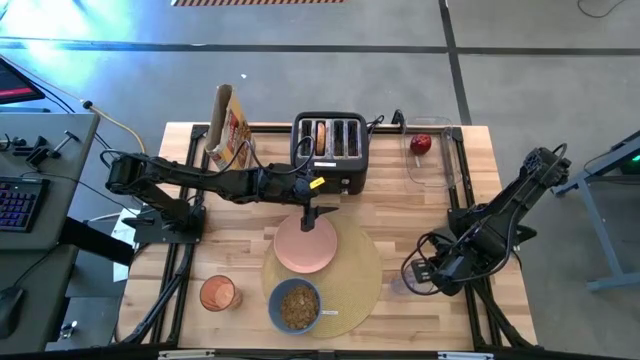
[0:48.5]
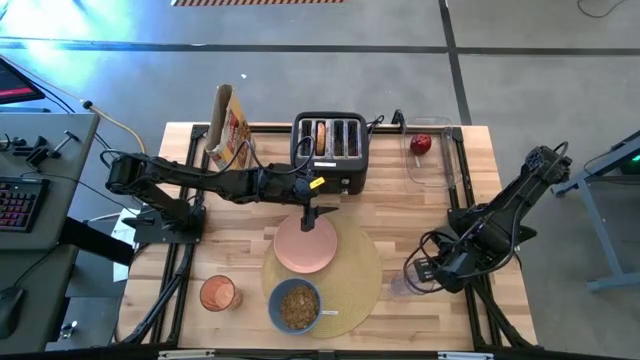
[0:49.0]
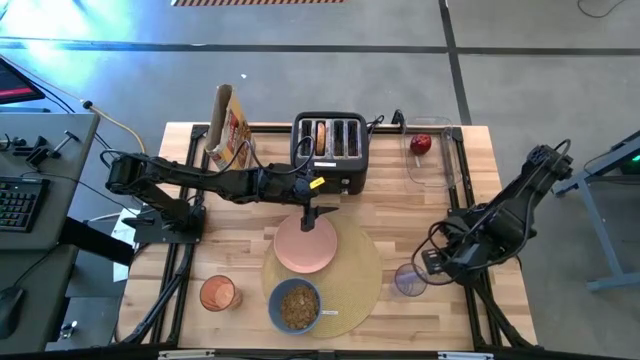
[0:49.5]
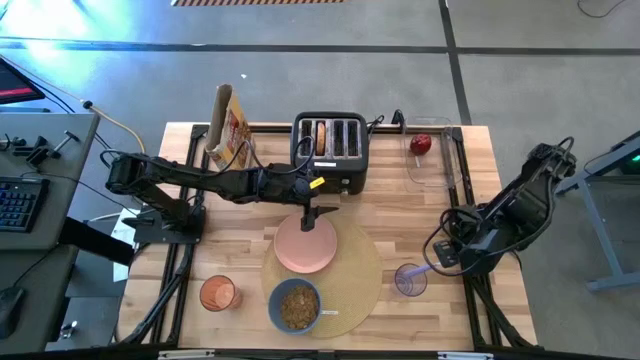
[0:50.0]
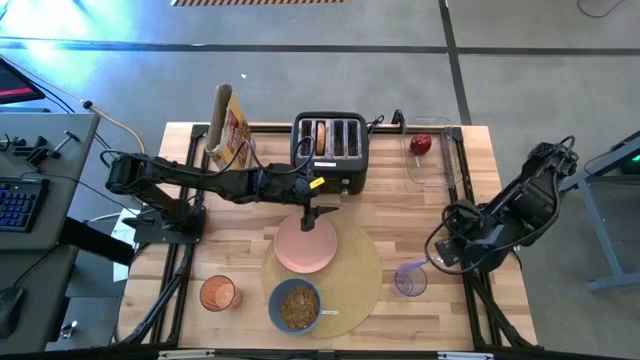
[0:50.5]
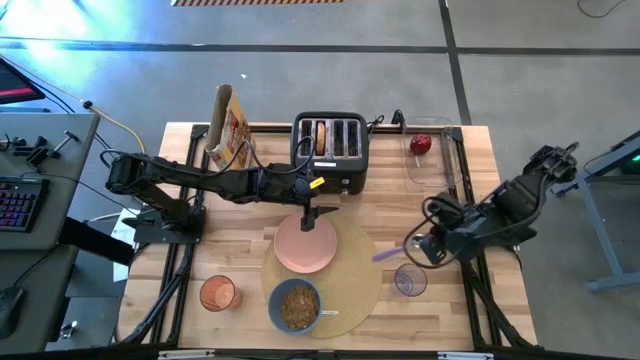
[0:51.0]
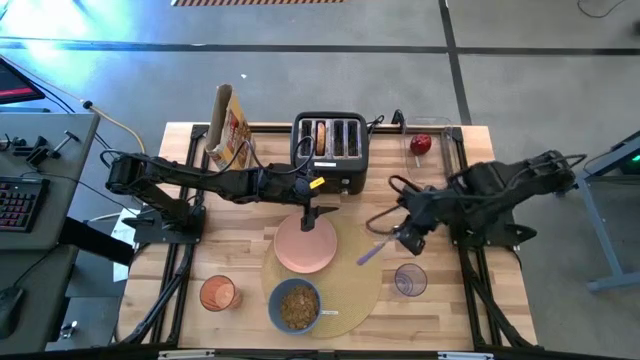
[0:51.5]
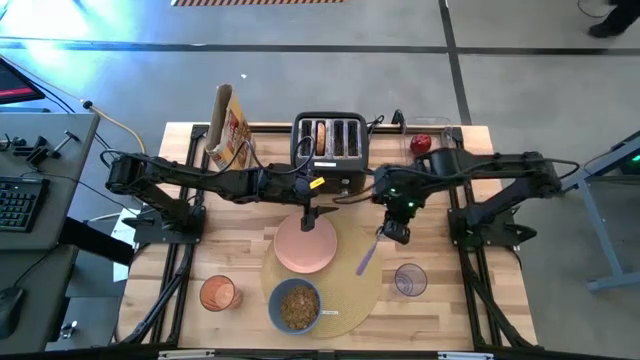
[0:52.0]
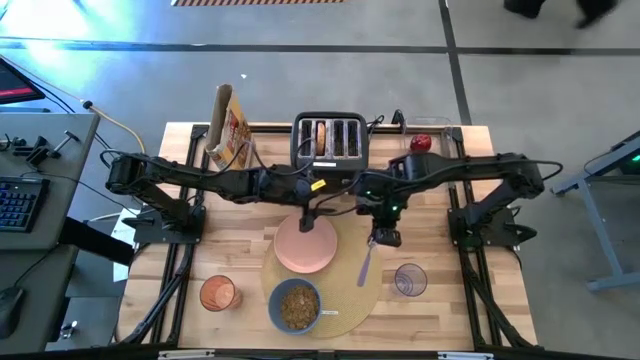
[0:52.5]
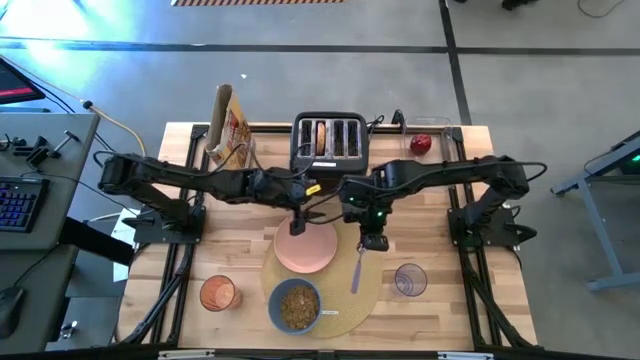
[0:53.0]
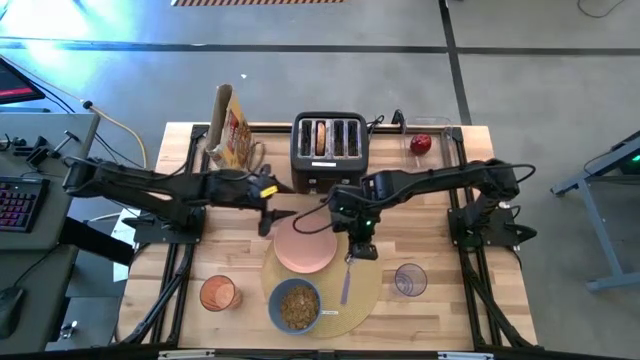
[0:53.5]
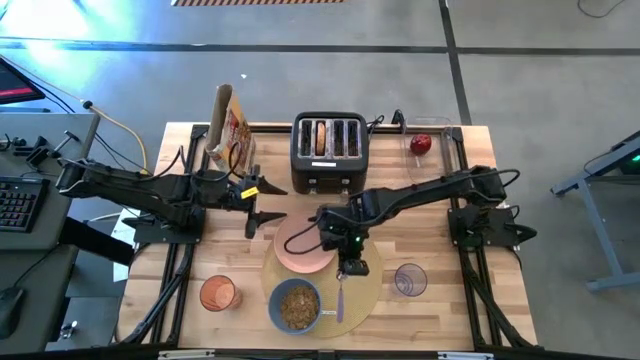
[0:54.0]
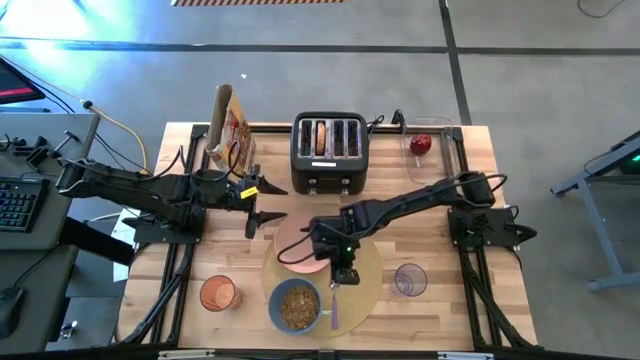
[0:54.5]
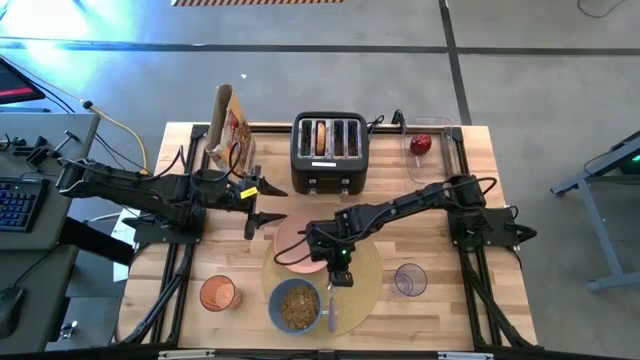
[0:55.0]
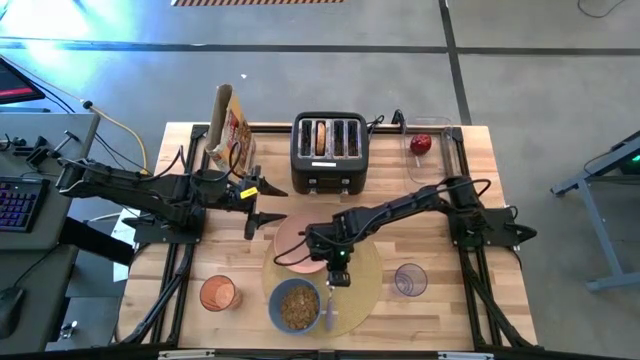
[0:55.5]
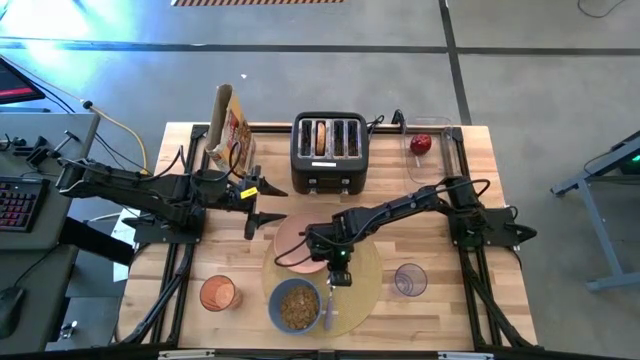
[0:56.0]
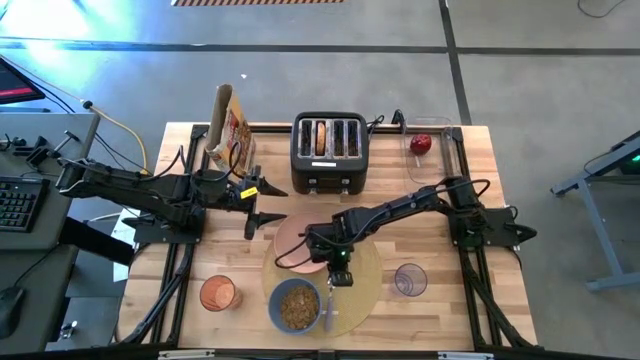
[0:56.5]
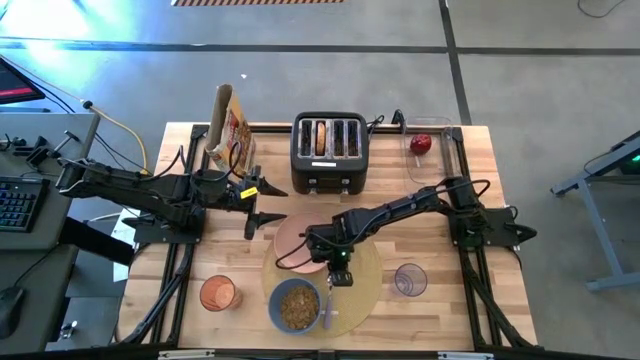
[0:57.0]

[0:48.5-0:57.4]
Task: Arrange a breakfast setting
Put the spoon on the place mat

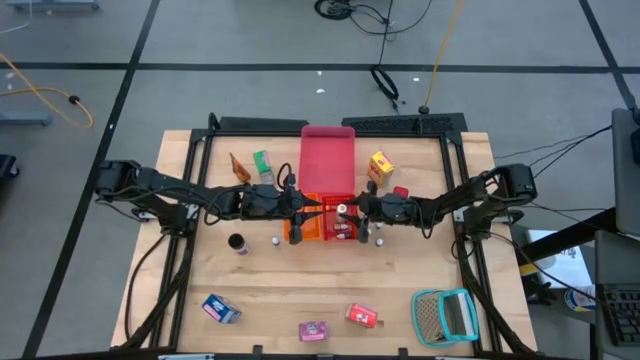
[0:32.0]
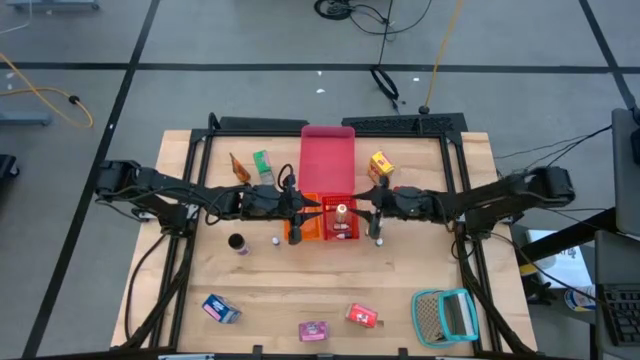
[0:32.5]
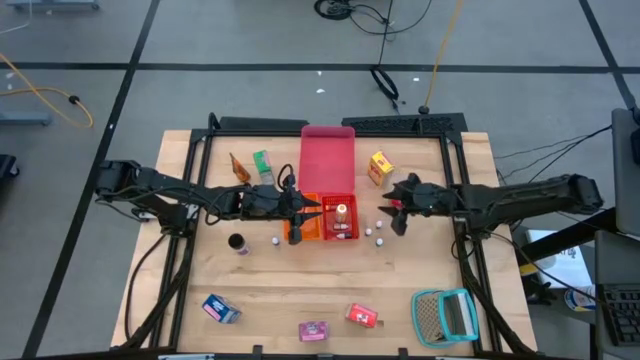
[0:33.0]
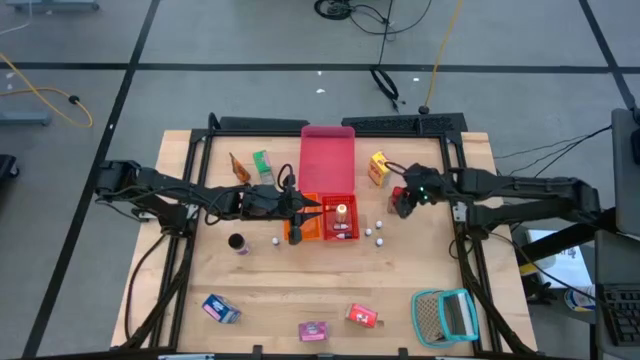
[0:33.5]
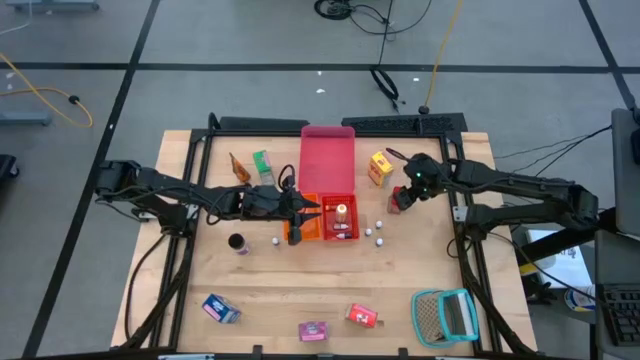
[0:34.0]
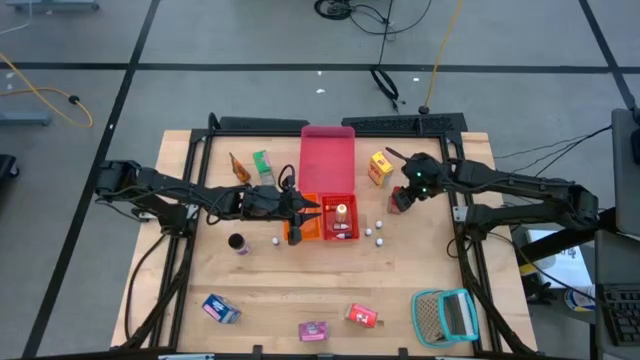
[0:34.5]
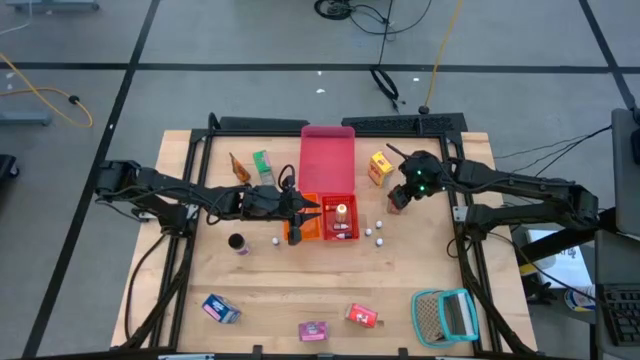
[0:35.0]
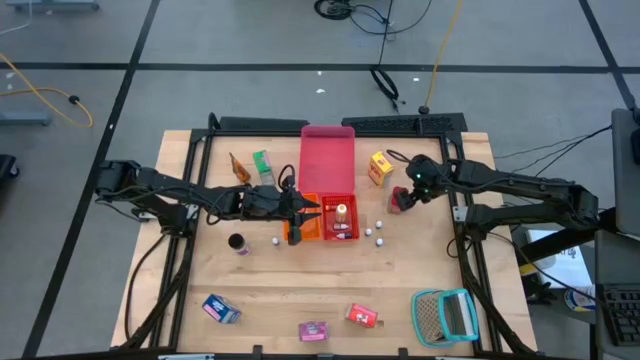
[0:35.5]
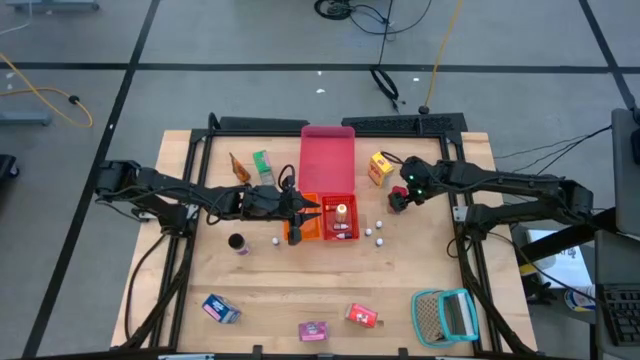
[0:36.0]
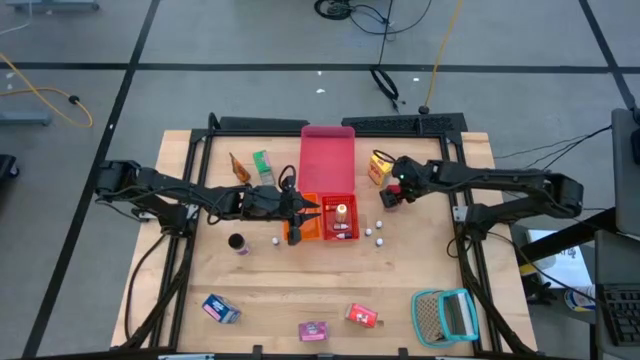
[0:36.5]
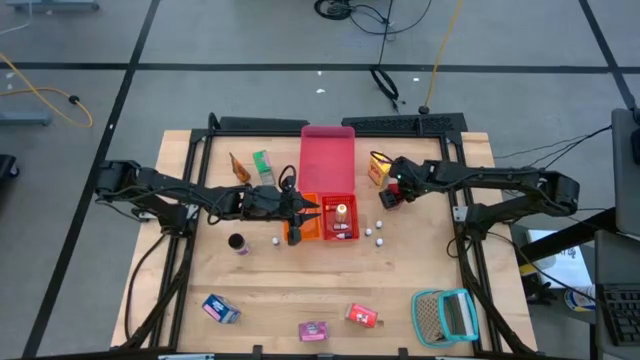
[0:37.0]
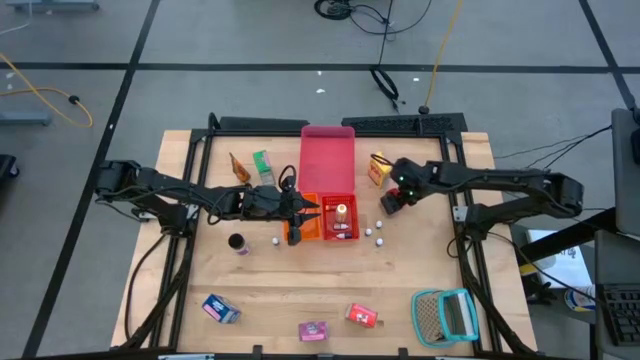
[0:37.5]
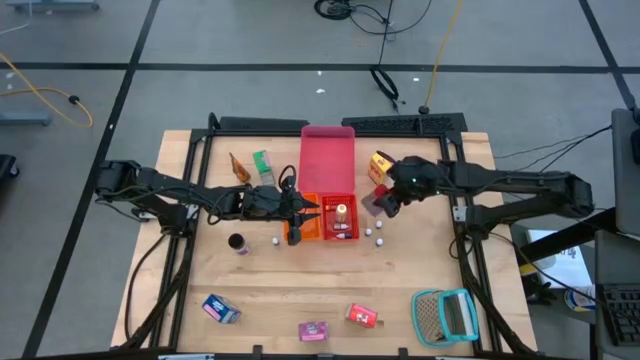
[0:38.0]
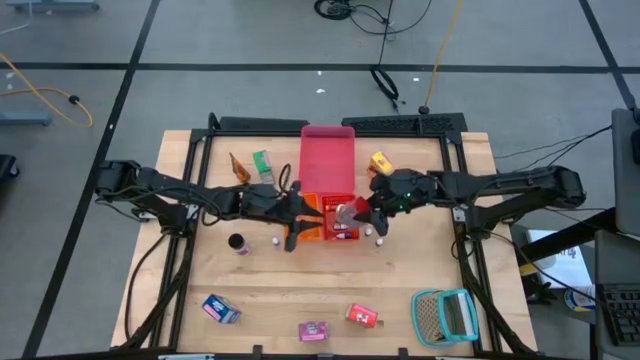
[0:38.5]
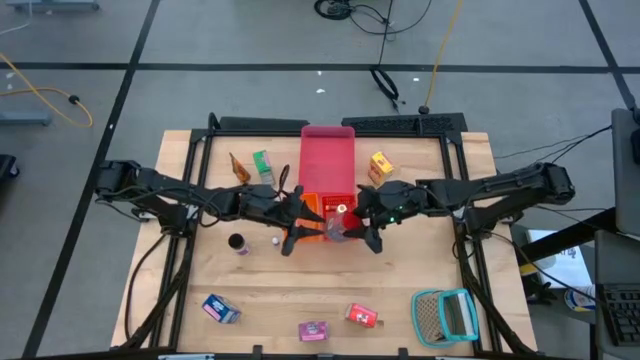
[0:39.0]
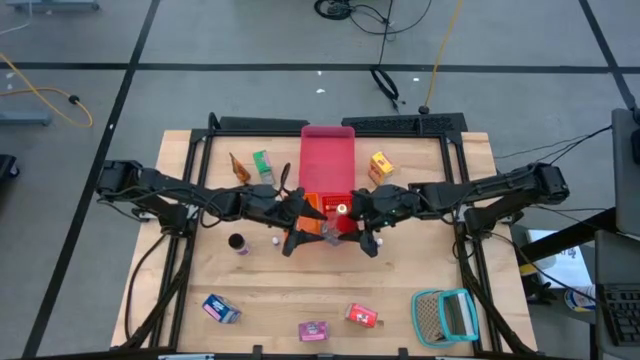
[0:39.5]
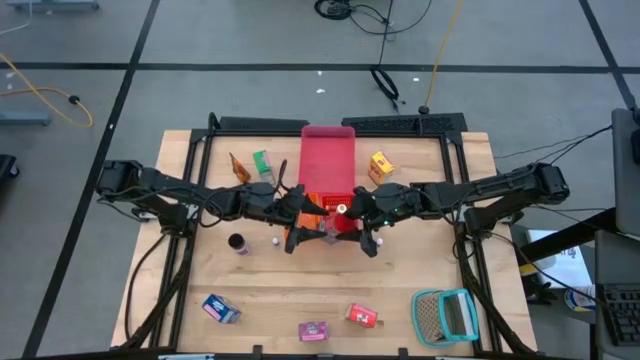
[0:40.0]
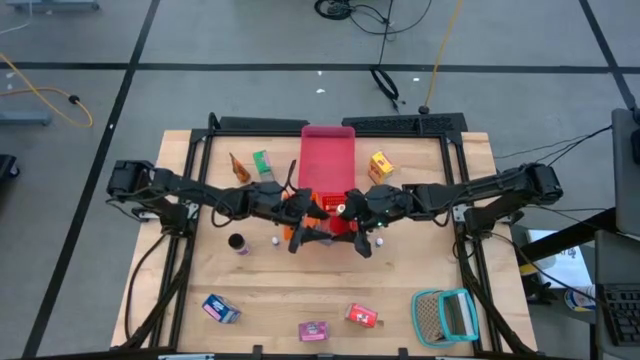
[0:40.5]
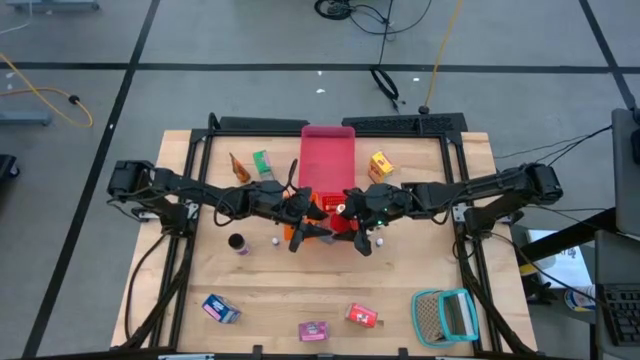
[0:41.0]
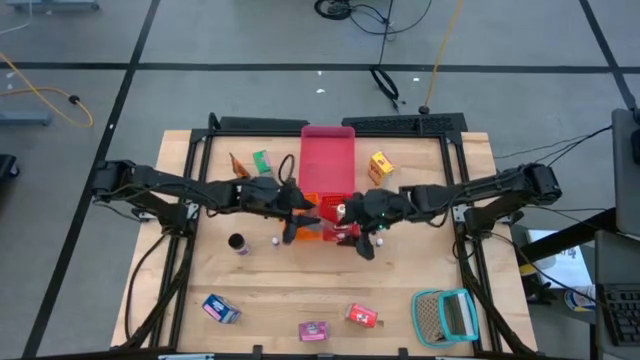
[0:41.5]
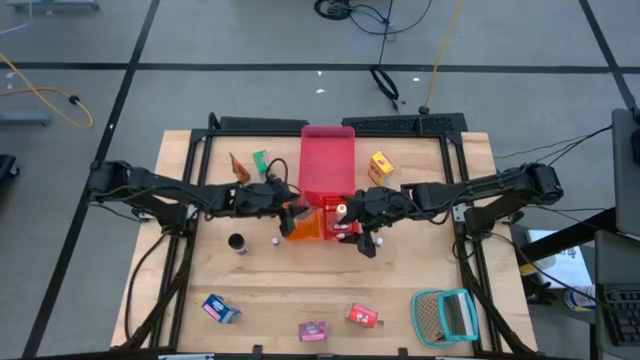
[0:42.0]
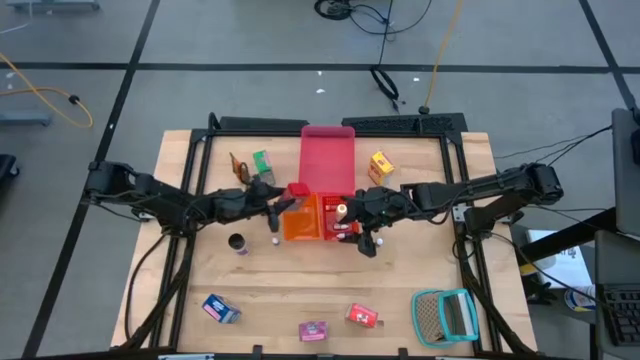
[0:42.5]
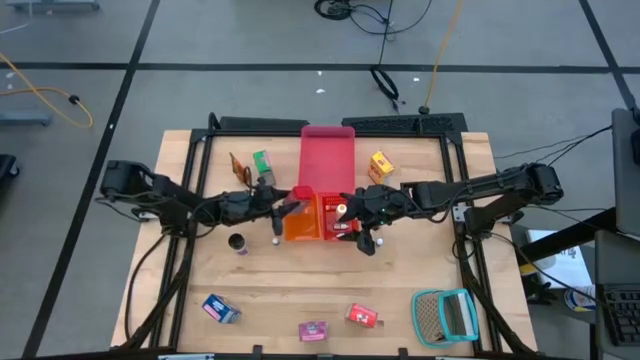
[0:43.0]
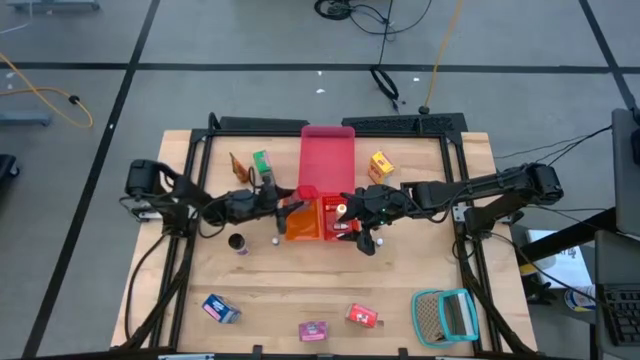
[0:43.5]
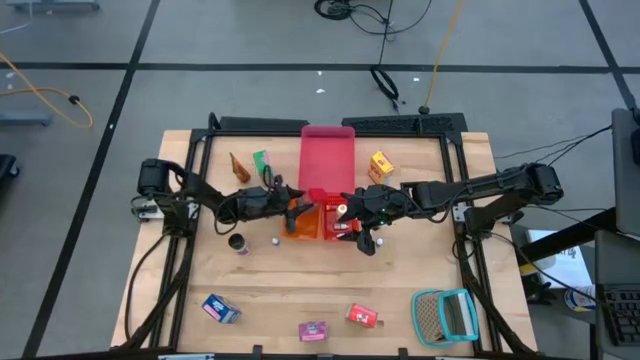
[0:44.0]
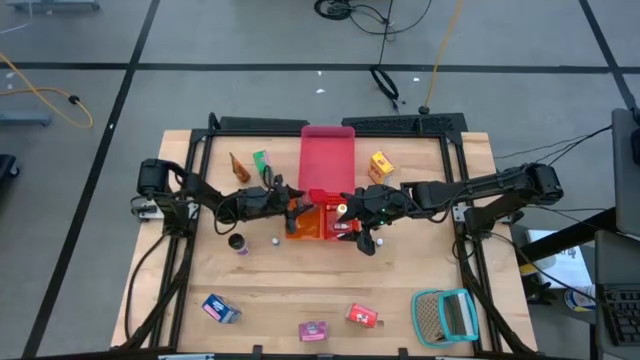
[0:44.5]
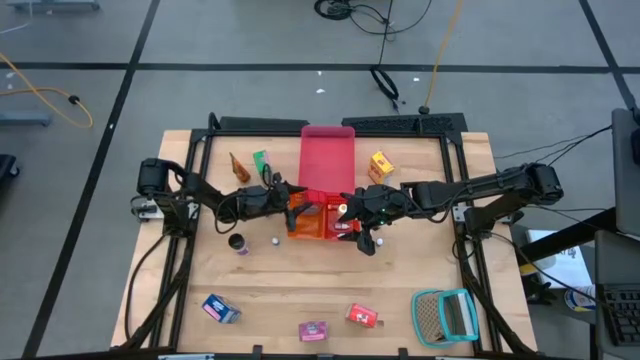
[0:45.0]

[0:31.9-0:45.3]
Task: Pick & Place Kitchen Items
Put the red spice can into the orange basket
